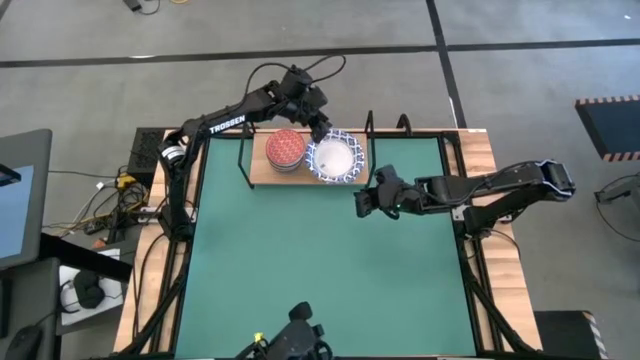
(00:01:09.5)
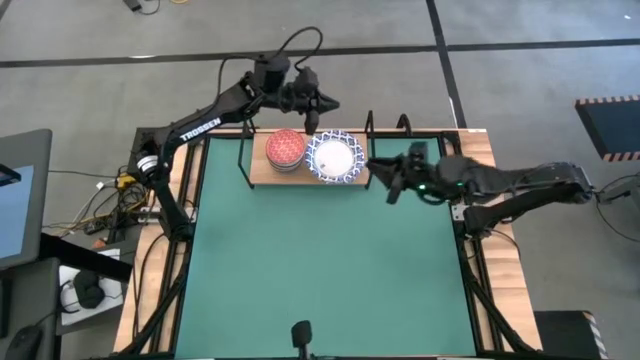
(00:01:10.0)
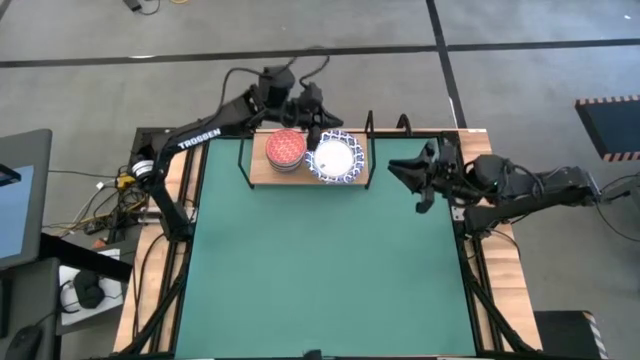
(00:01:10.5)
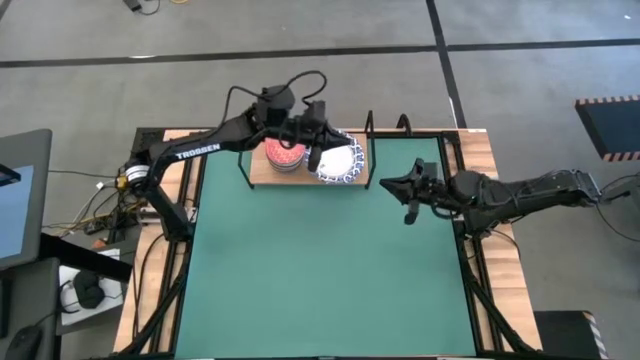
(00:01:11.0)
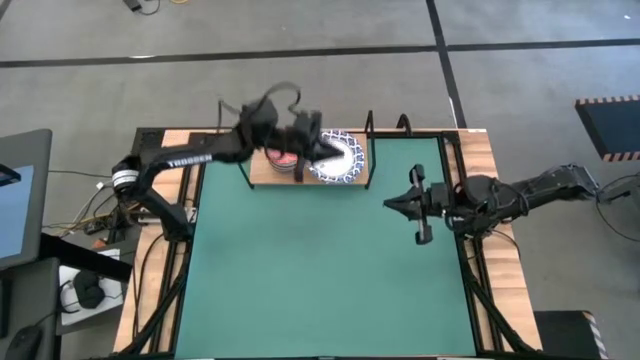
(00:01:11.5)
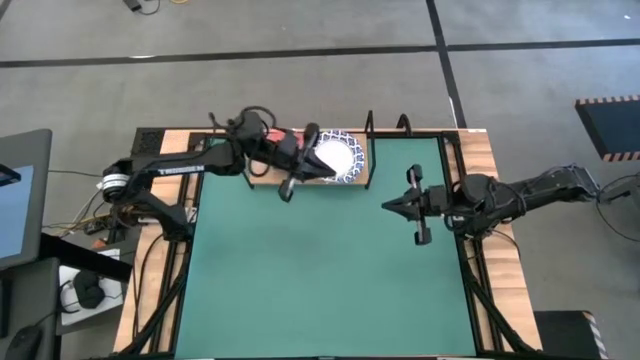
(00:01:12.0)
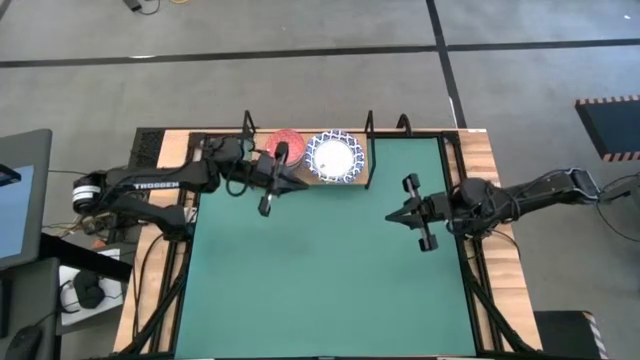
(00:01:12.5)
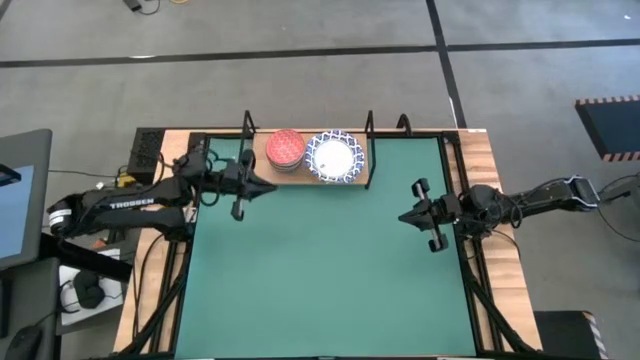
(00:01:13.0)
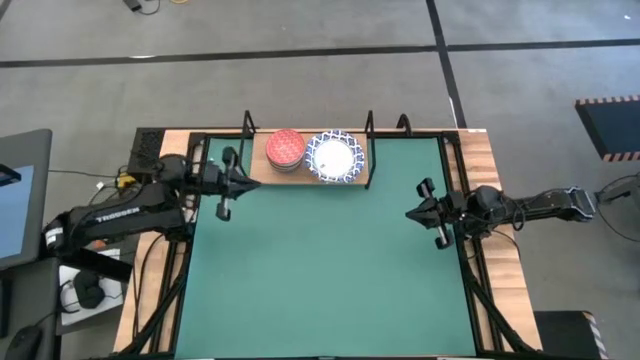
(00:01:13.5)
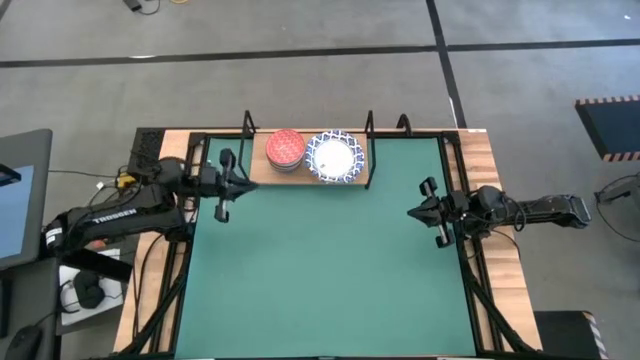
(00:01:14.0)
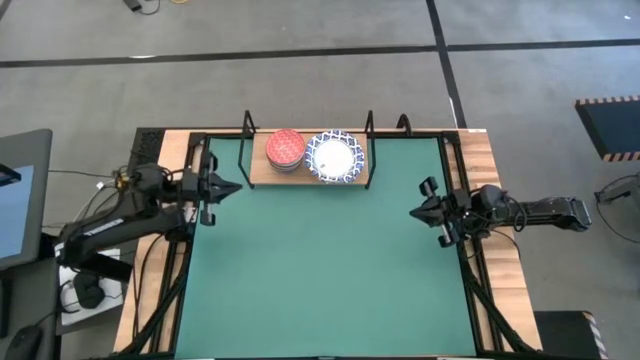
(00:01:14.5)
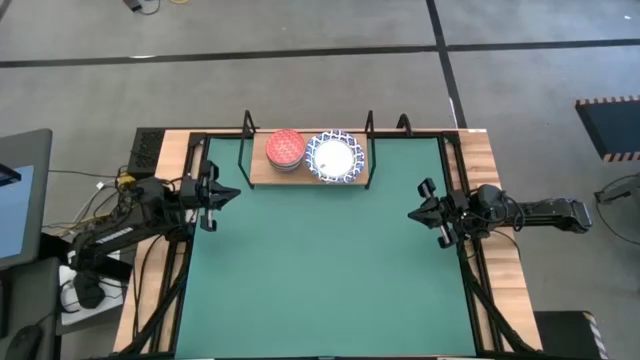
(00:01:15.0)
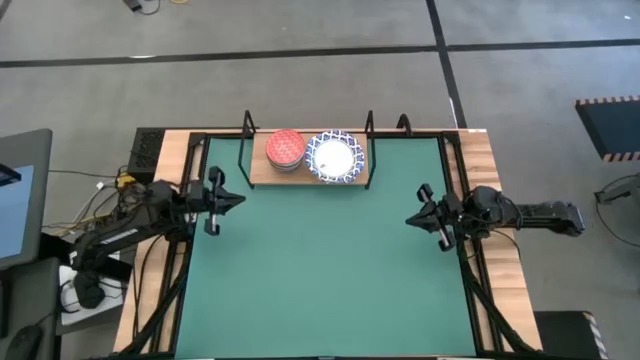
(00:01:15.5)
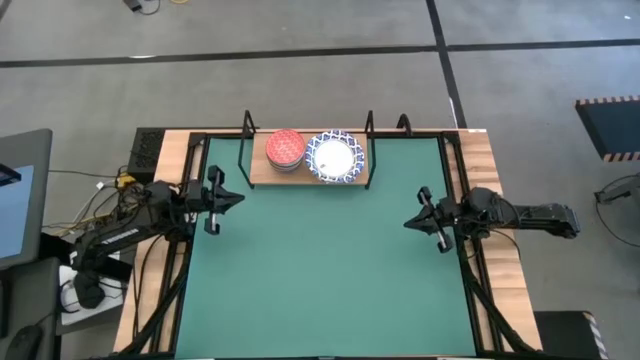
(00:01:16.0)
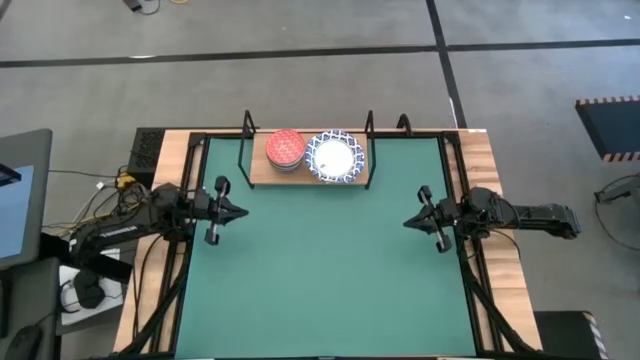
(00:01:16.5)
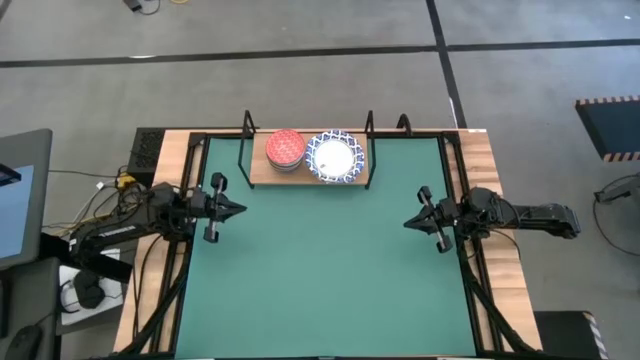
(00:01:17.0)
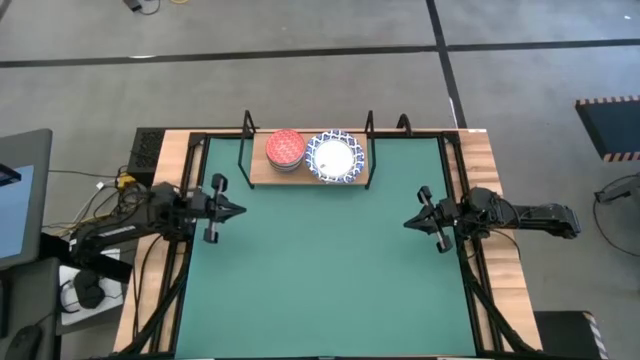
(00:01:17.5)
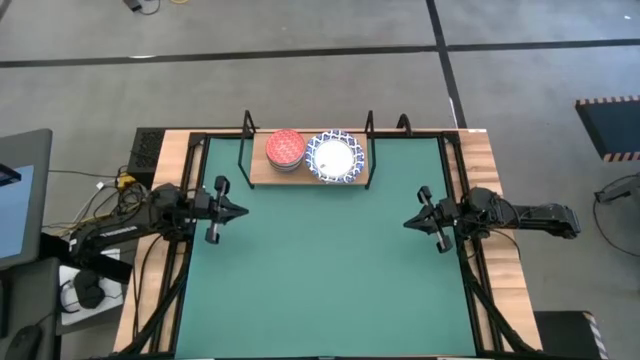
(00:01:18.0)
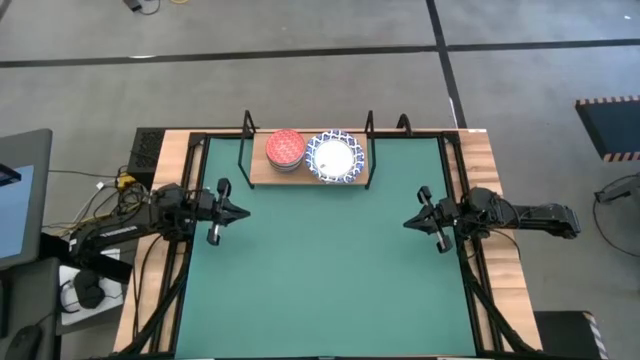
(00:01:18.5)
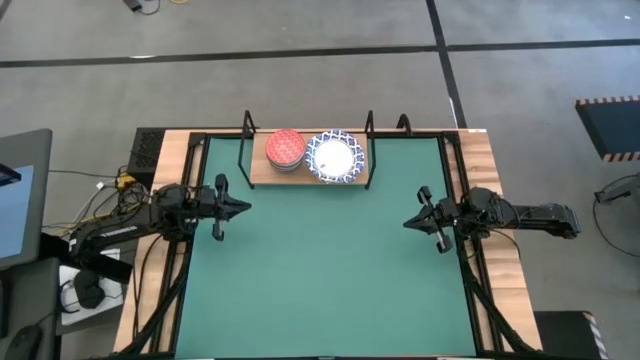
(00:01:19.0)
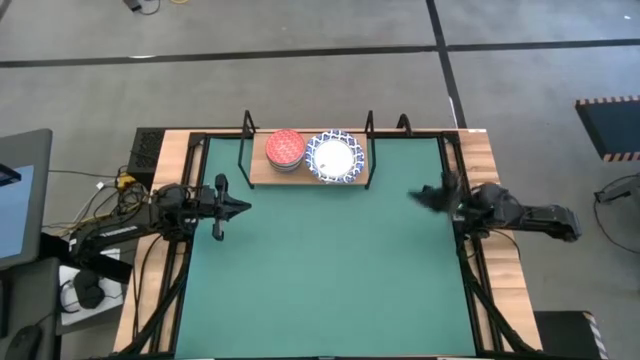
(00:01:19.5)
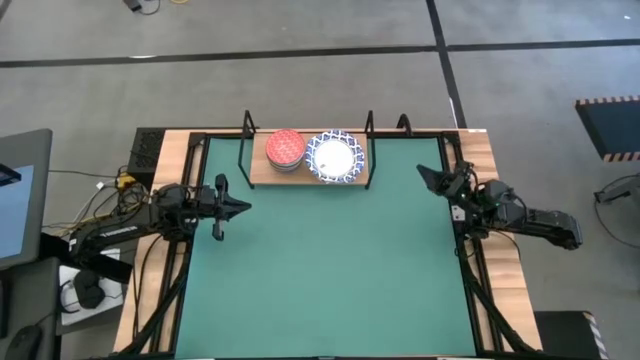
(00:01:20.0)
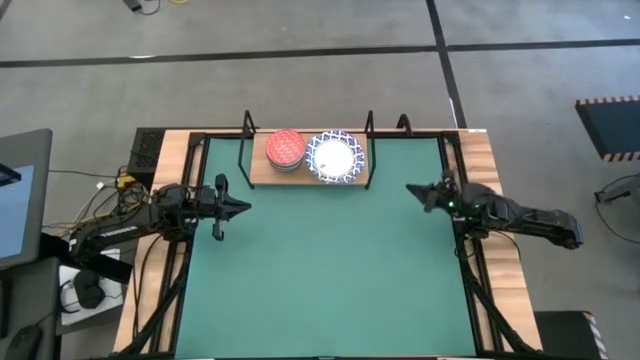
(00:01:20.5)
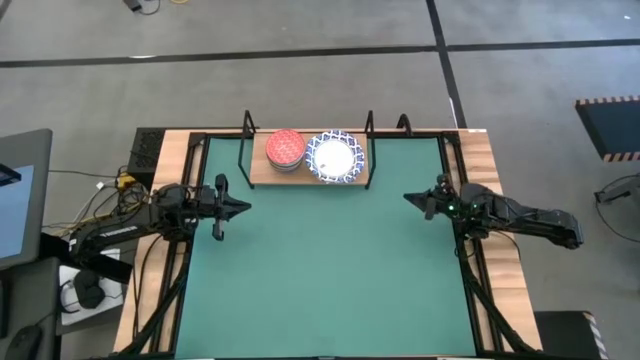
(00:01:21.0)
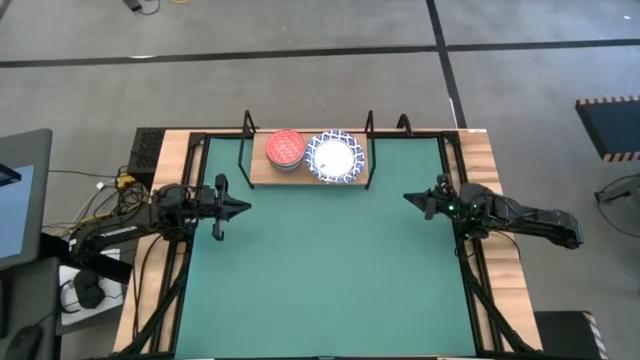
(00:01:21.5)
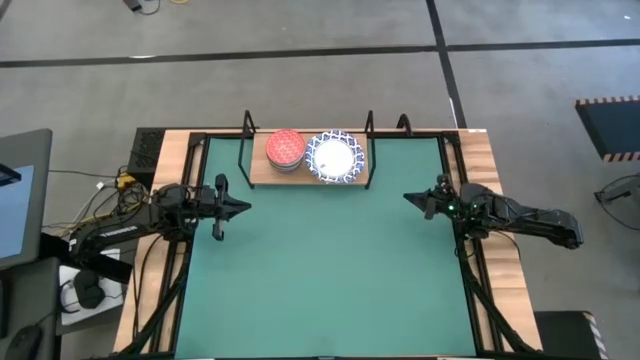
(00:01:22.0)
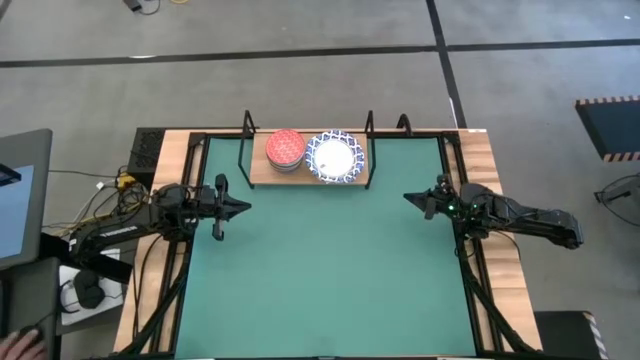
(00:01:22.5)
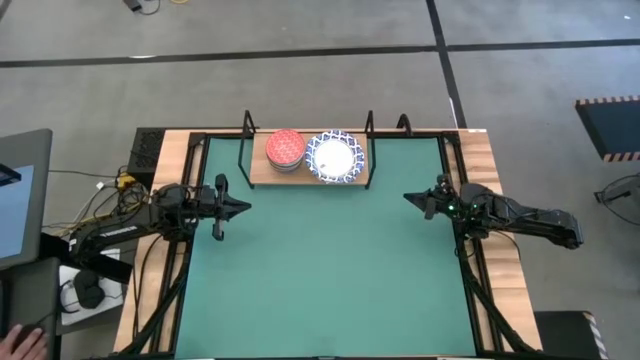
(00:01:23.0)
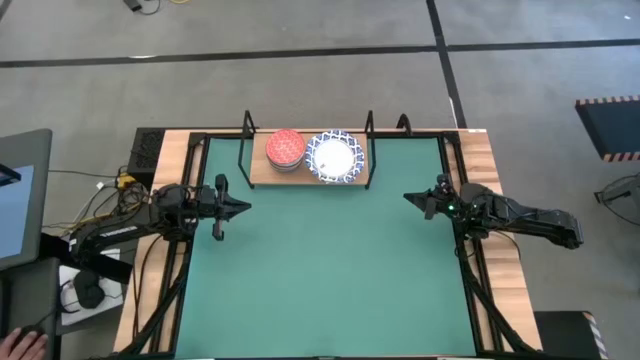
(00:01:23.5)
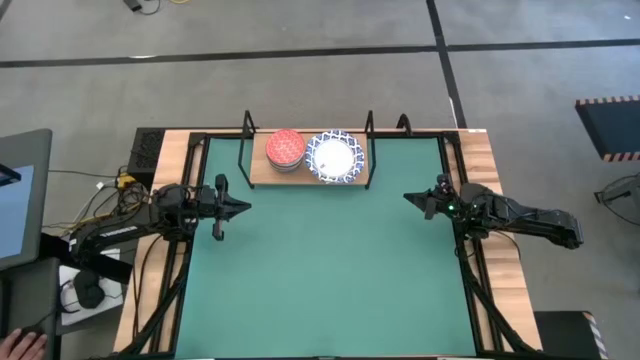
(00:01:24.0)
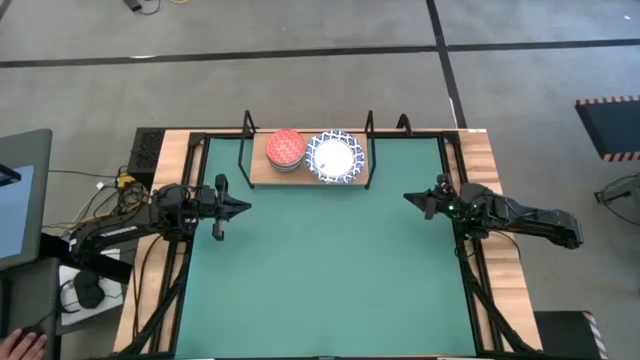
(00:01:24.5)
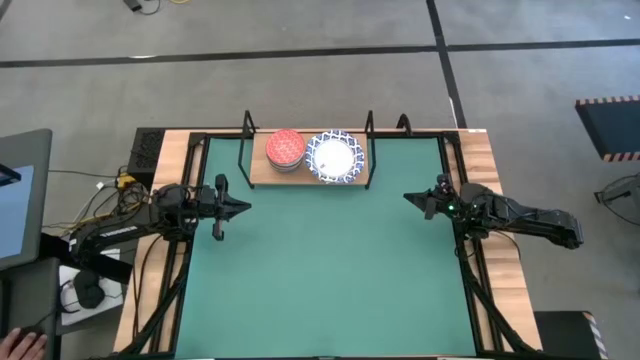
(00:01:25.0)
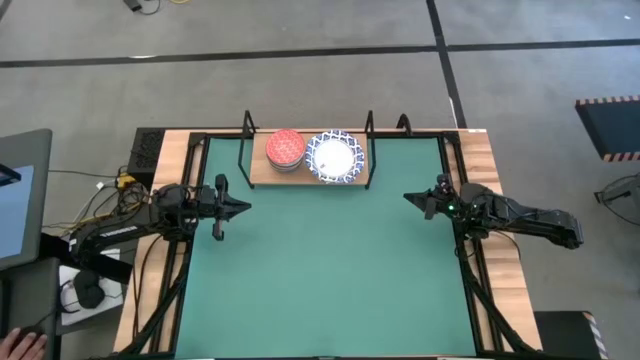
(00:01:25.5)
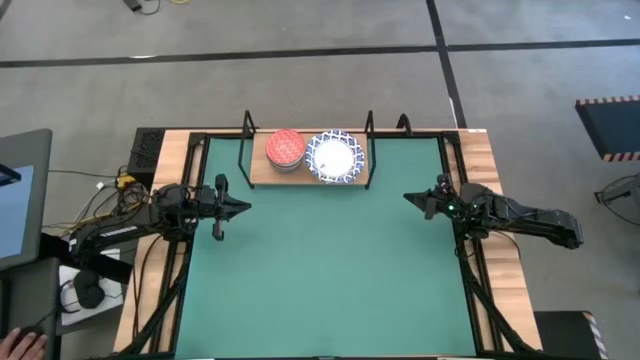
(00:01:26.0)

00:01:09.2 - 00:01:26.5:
Task: Place and stack bowls onto a shelf
Return to Home Position

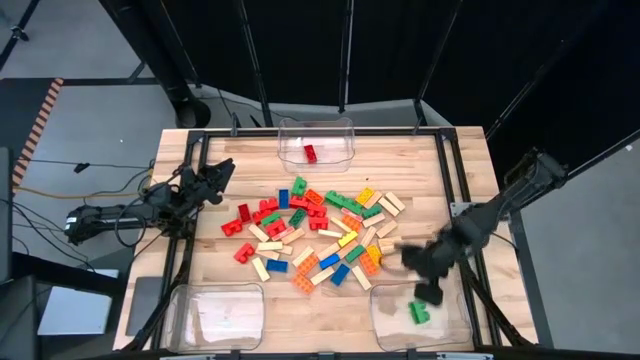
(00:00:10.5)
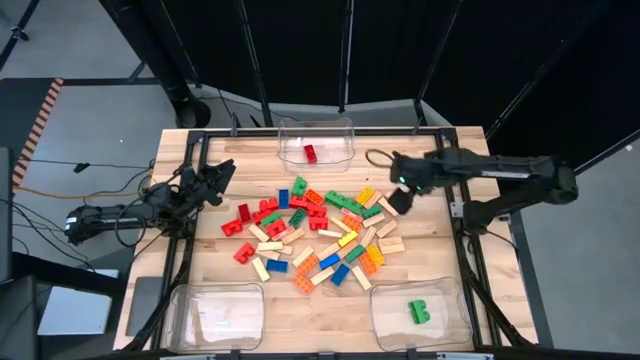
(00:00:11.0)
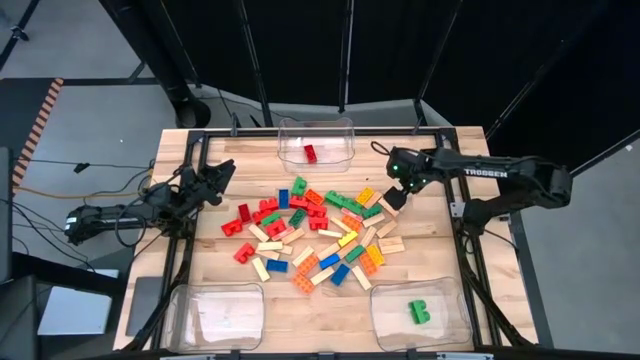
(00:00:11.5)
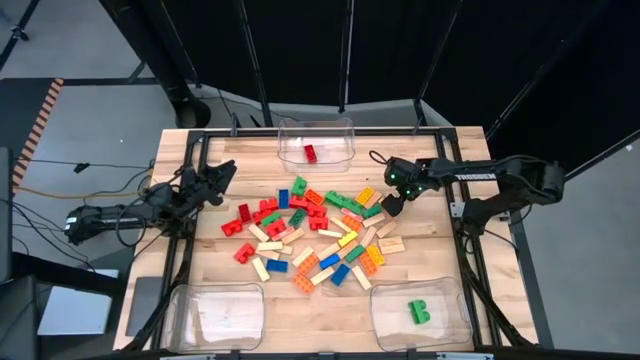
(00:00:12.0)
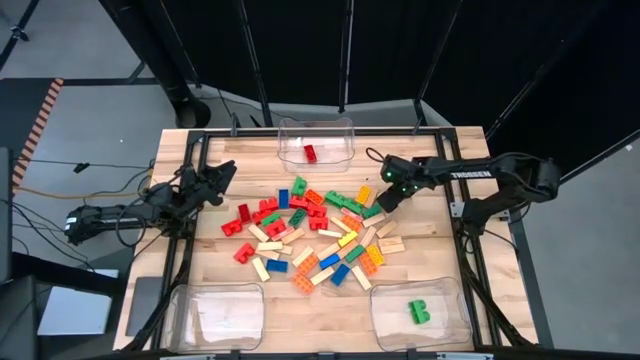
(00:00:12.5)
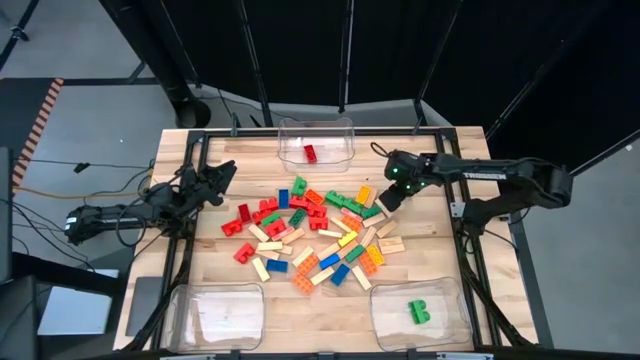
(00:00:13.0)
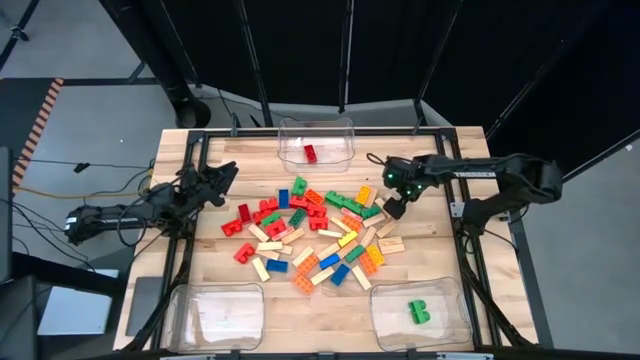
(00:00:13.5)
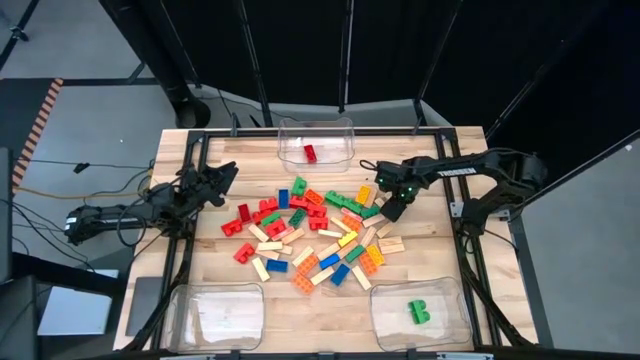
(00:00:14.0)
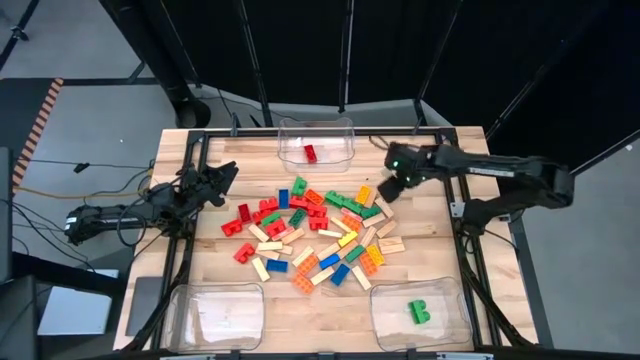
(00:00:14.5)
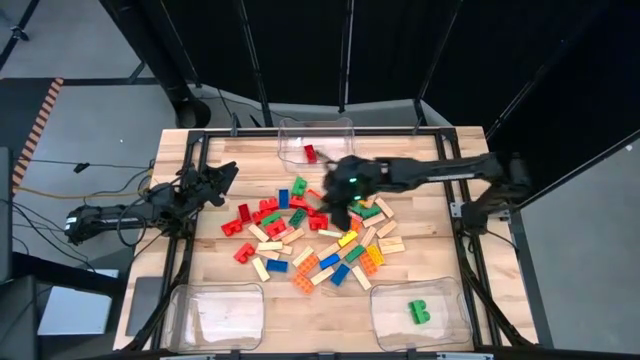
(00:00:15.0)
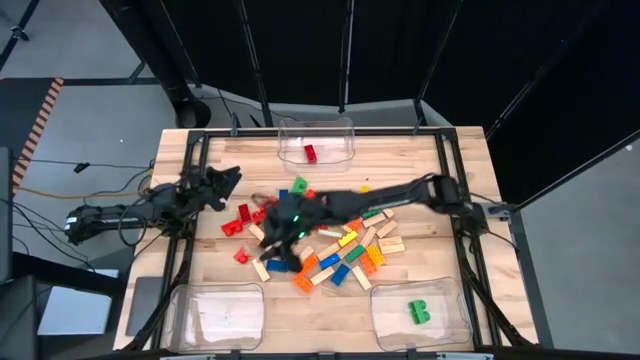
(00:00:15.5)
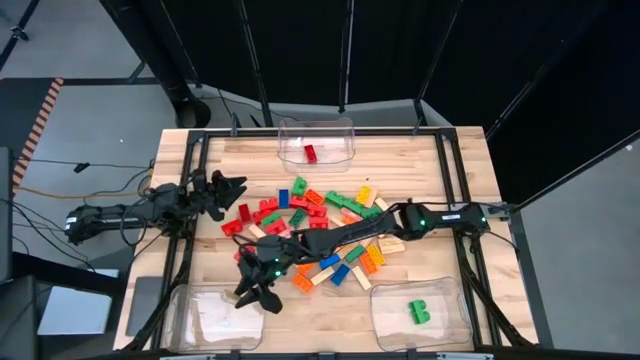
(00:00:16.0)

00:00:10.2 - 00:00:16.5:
Task: Sort blocks by size
Put the white block into the bottom left transparent bin
